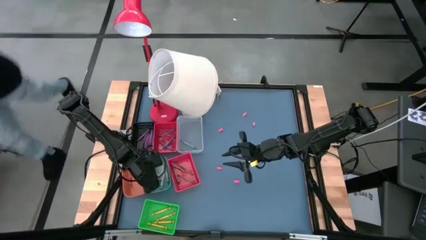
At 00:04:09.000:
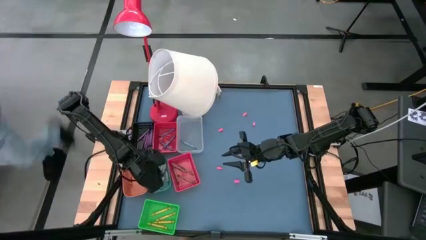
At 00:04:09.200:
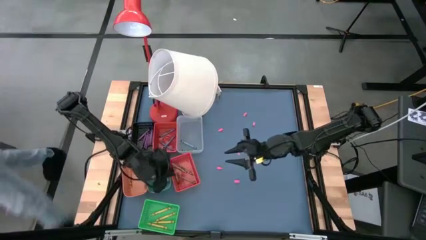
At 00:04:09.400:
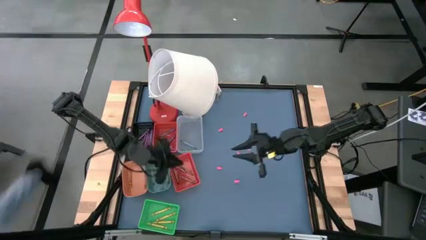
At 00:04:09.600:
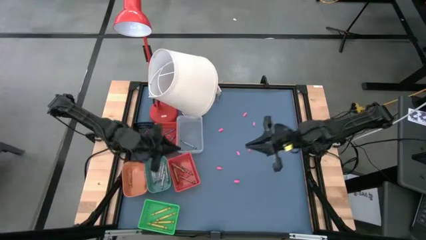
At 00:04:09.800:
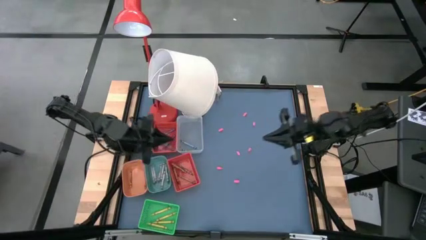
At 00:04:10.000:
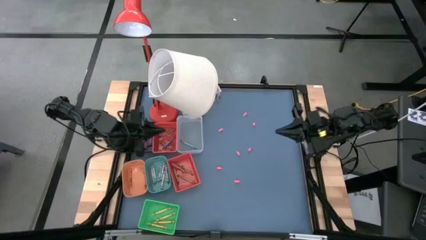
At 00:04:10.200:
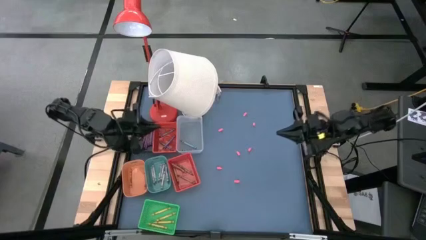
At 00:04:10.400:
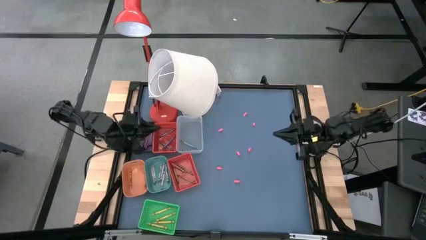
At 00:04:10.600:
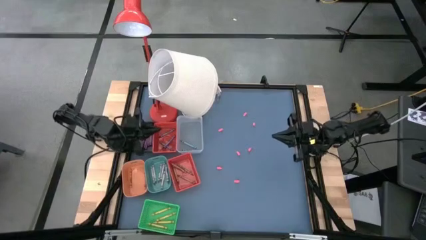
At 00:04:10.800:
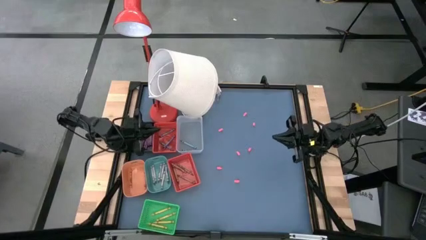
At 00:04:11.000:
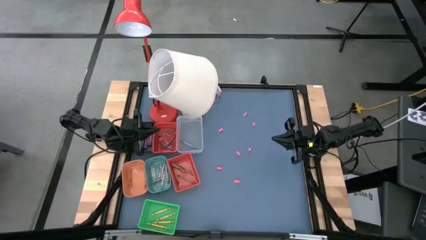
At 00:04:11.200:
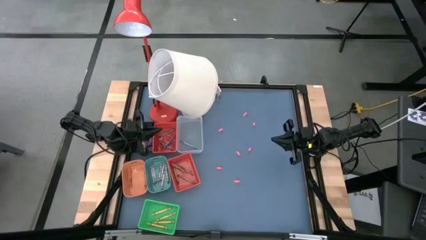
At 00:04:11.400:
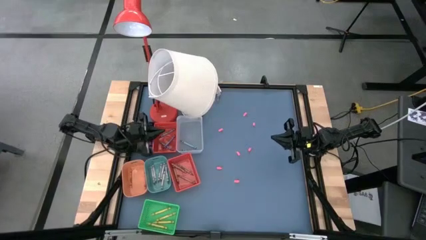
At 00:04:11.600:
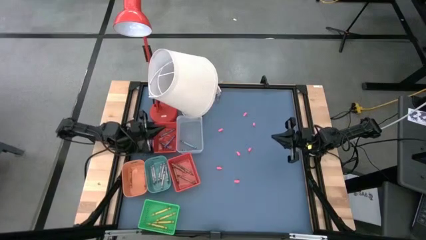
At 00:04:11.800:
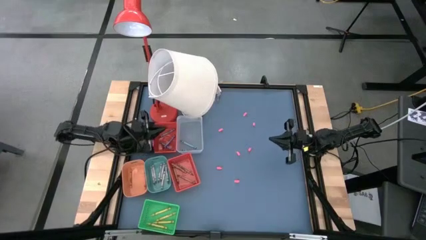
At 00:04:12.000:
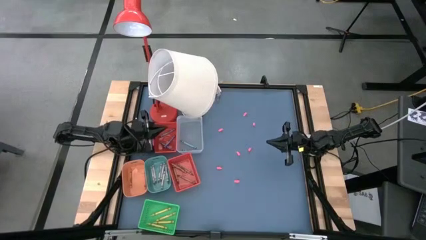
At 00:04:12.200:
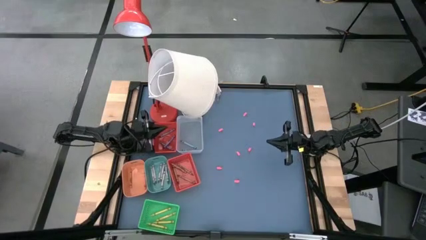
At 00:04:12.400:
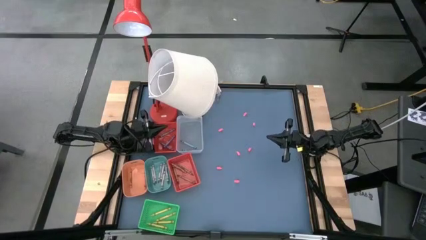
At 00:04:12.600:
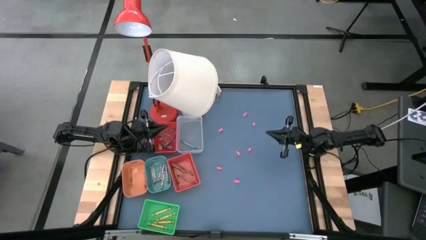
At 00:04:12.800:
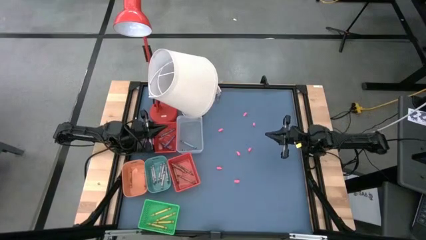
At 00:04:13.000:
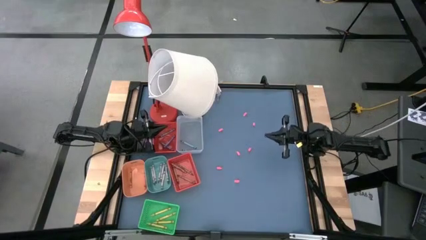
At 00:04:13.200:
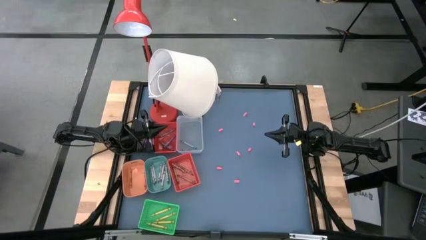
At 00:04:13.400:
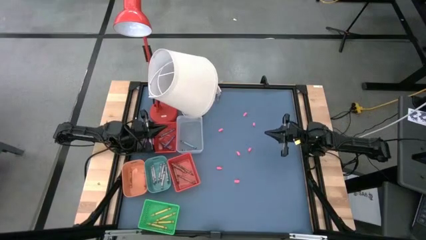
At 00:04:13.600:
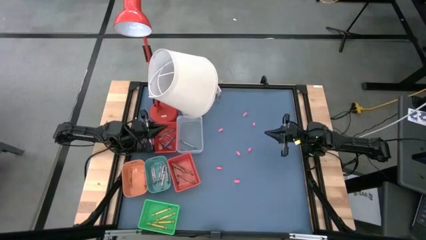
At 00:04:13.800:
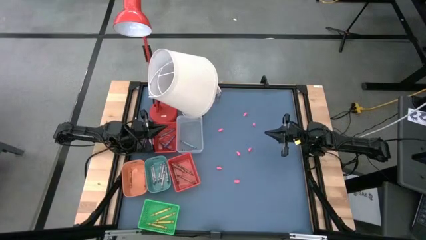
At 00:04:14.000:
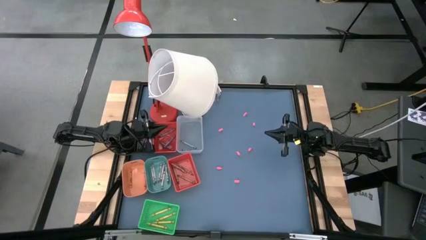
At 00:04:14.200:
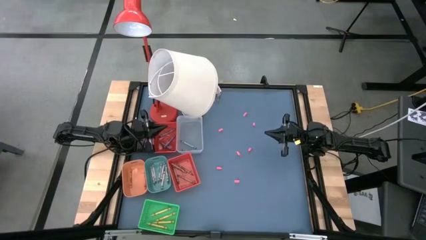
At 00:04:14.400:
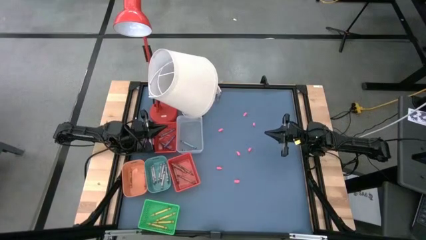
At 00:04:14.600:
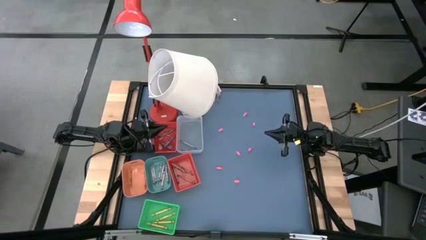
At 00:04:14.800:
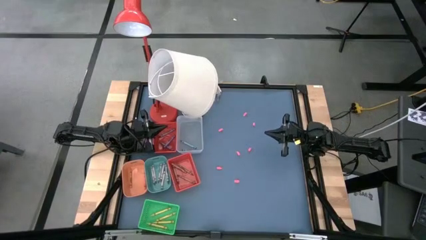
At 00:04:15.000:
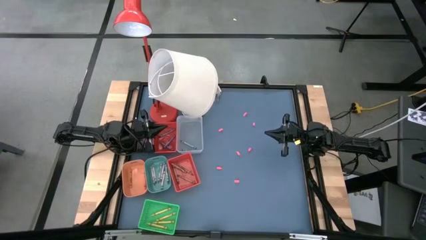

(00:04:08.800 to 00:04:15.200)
Task: Sort crayons
Return to Home Position
